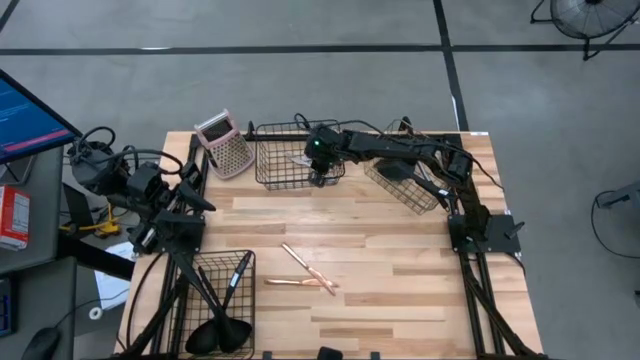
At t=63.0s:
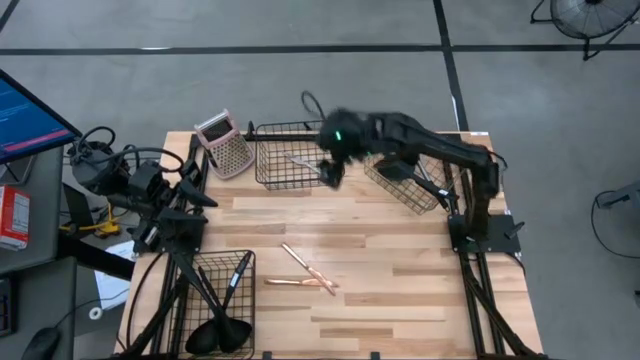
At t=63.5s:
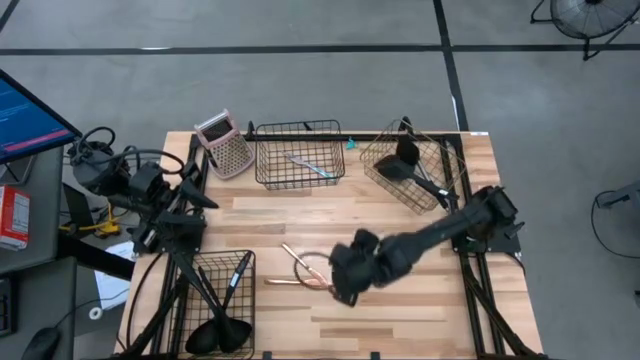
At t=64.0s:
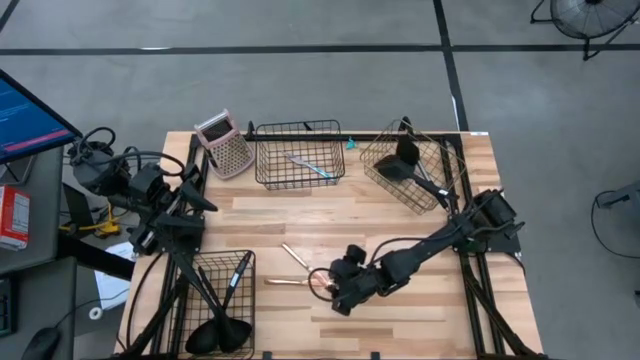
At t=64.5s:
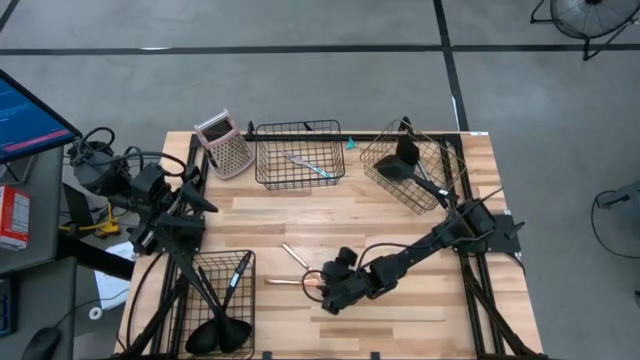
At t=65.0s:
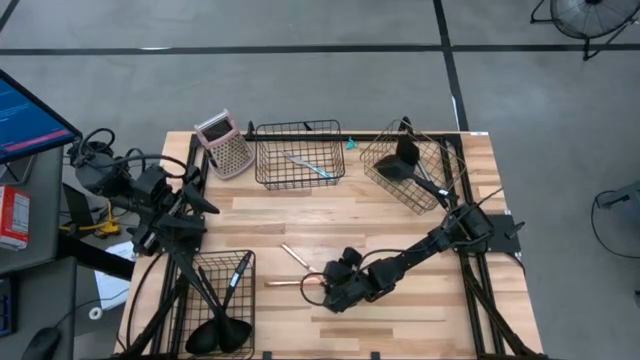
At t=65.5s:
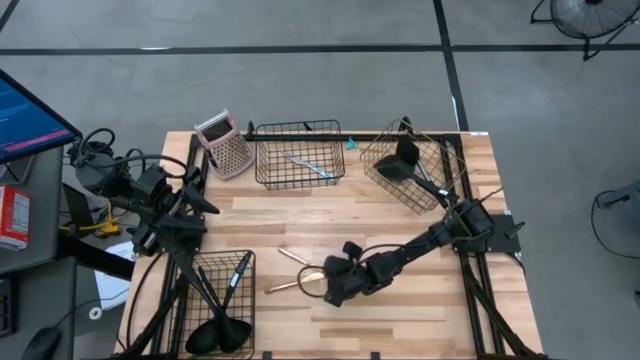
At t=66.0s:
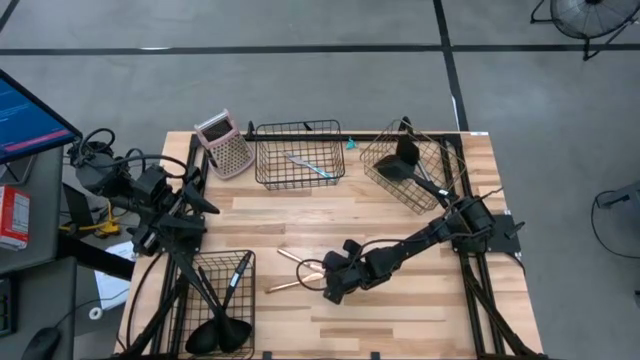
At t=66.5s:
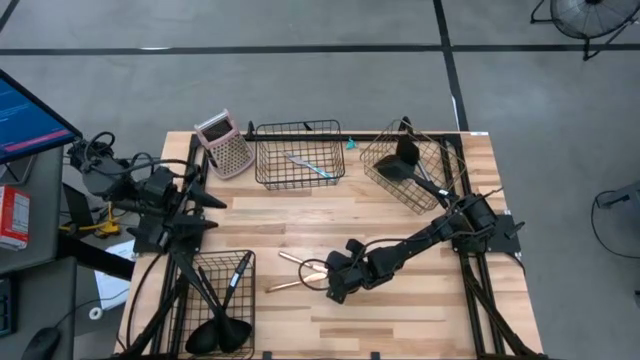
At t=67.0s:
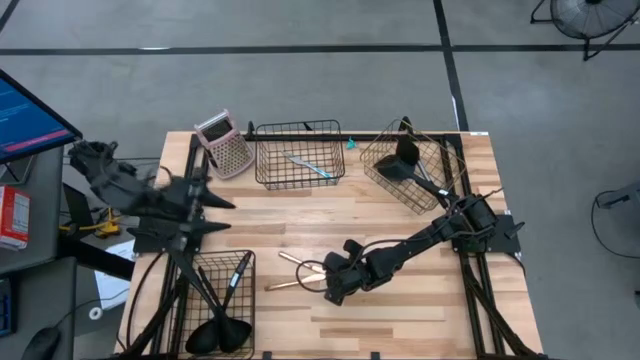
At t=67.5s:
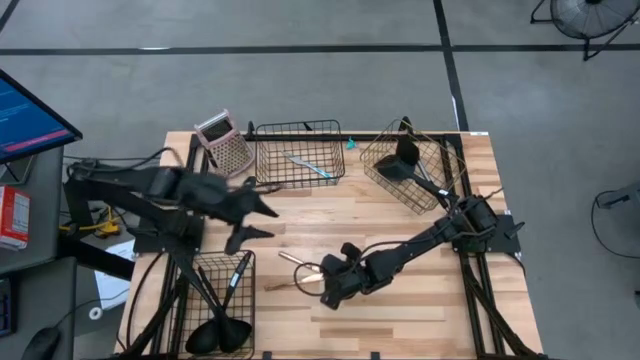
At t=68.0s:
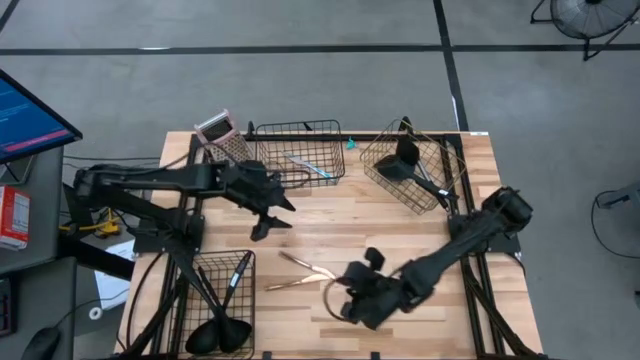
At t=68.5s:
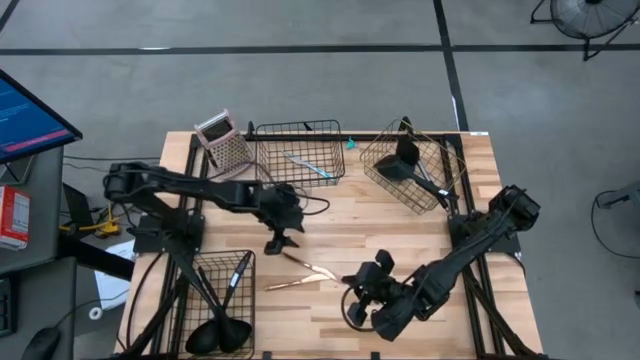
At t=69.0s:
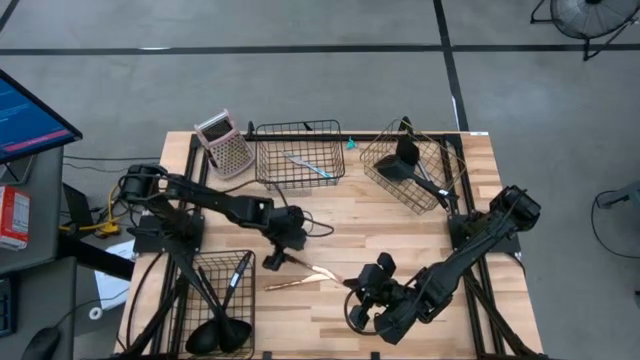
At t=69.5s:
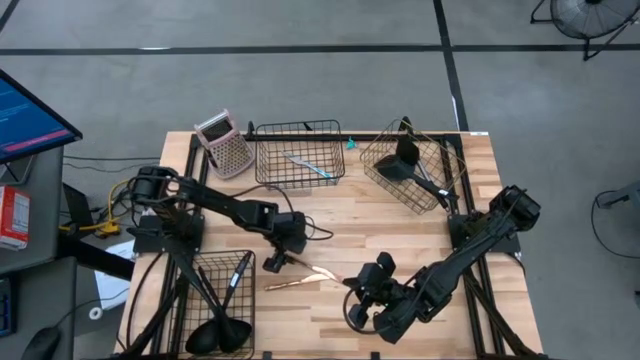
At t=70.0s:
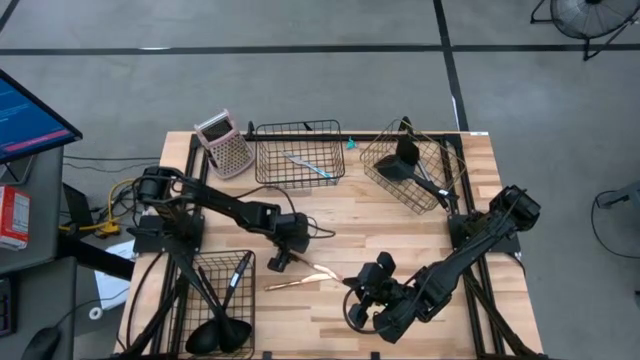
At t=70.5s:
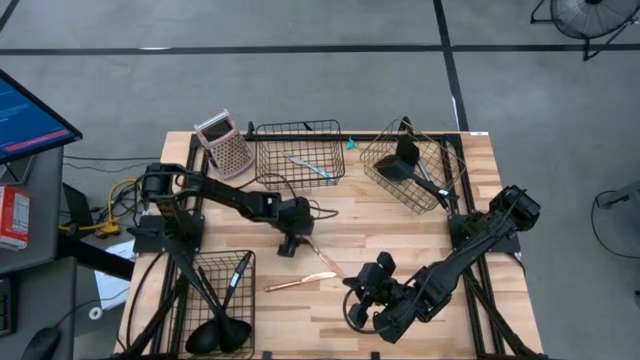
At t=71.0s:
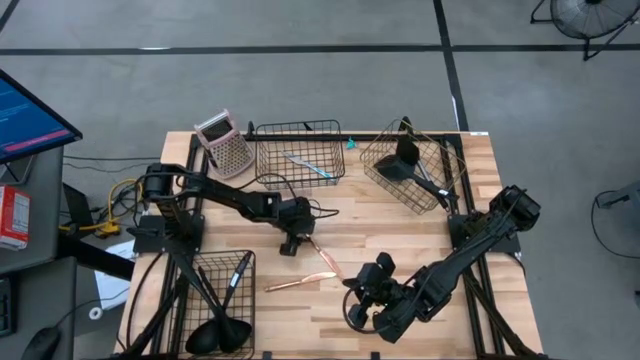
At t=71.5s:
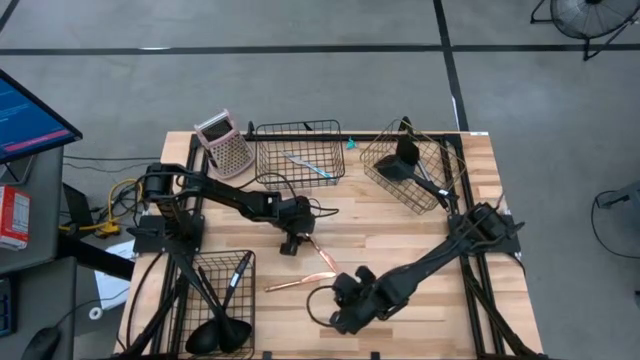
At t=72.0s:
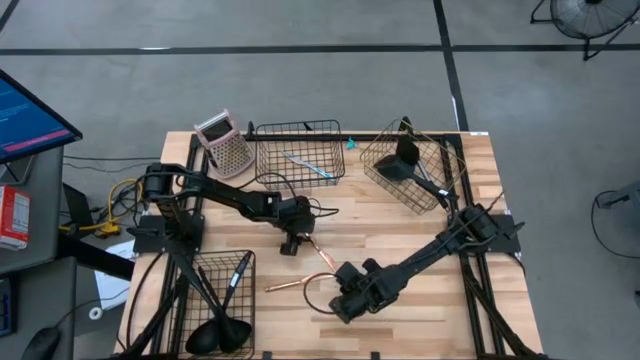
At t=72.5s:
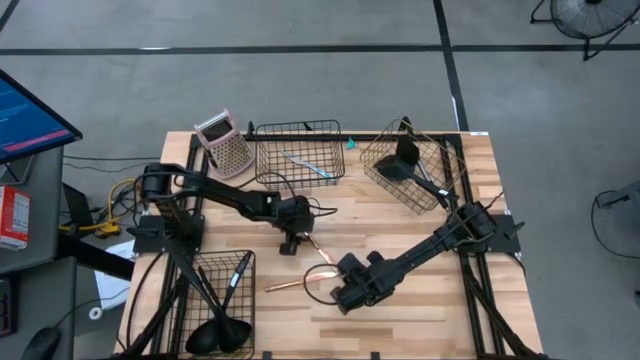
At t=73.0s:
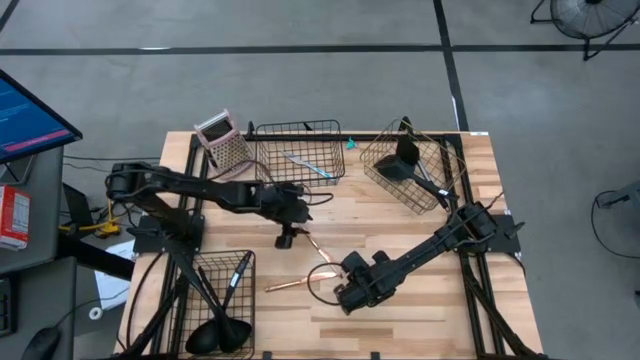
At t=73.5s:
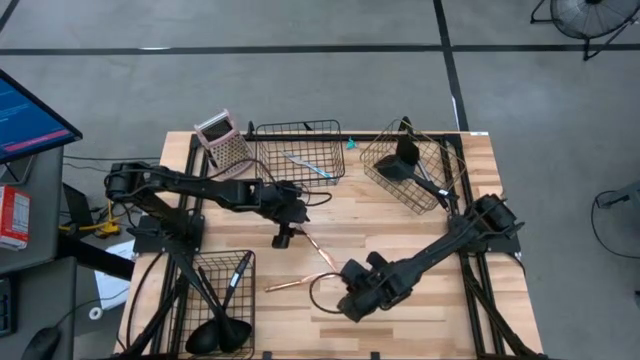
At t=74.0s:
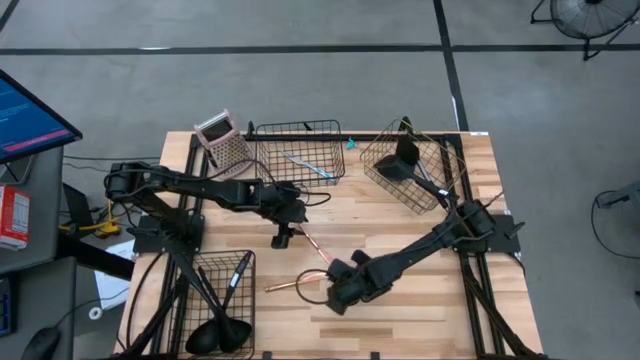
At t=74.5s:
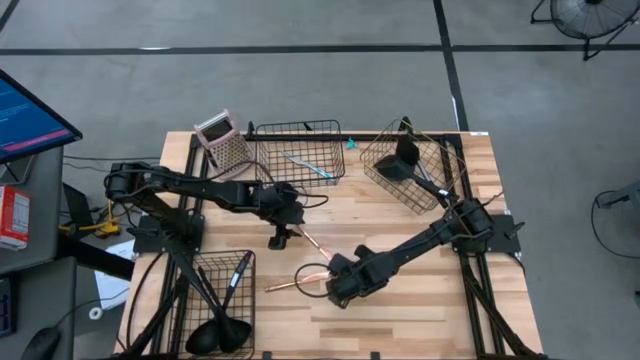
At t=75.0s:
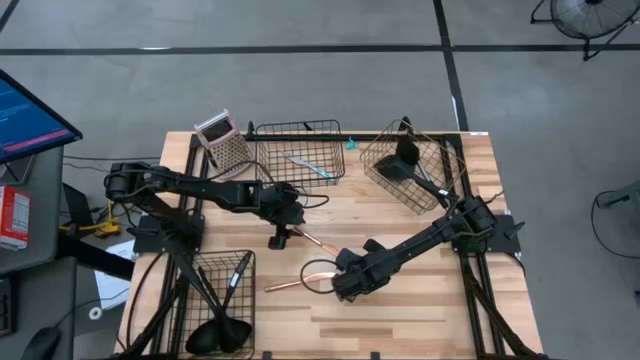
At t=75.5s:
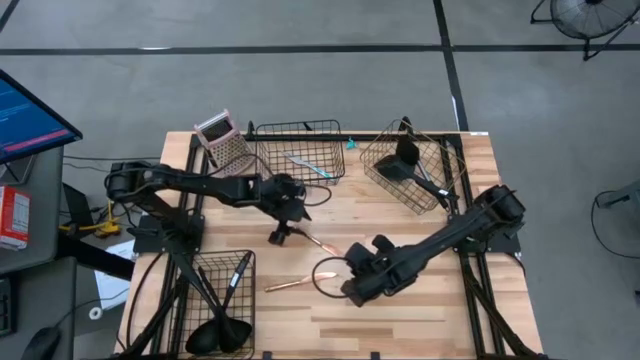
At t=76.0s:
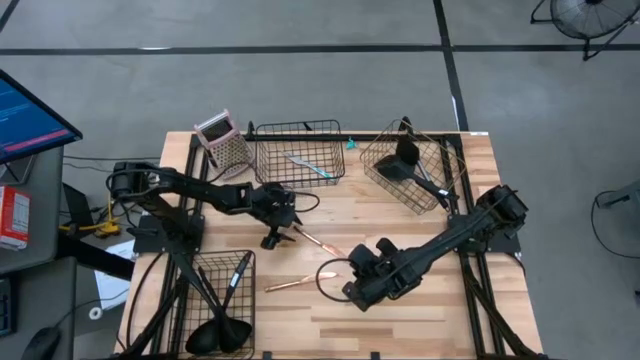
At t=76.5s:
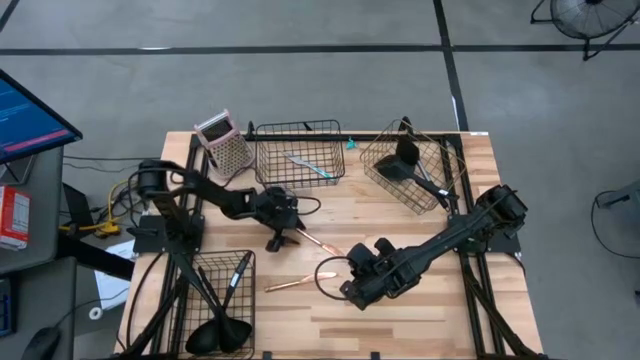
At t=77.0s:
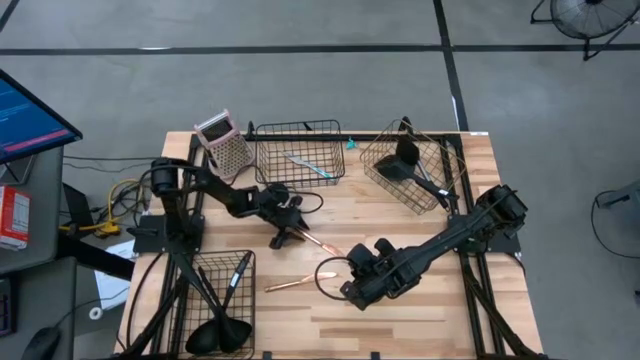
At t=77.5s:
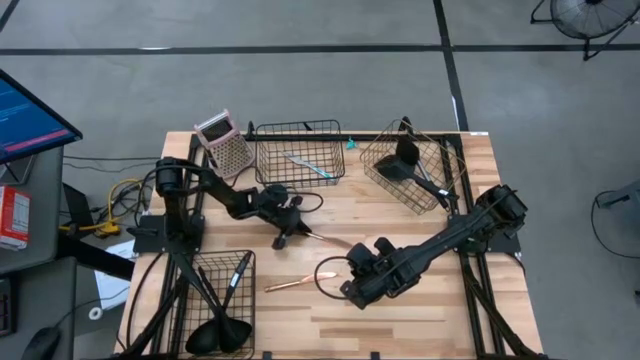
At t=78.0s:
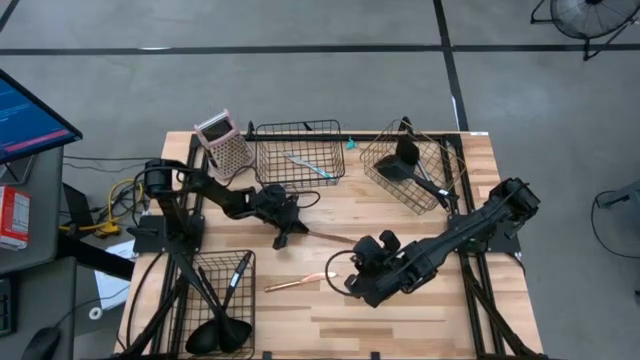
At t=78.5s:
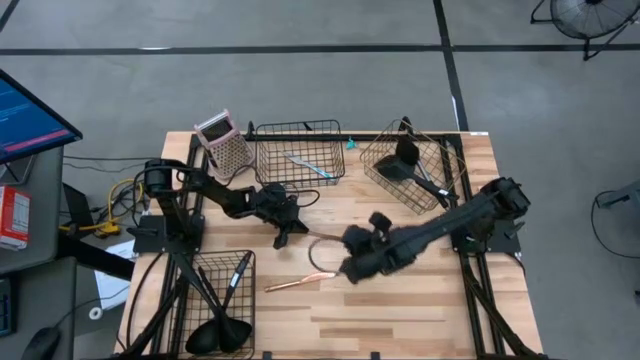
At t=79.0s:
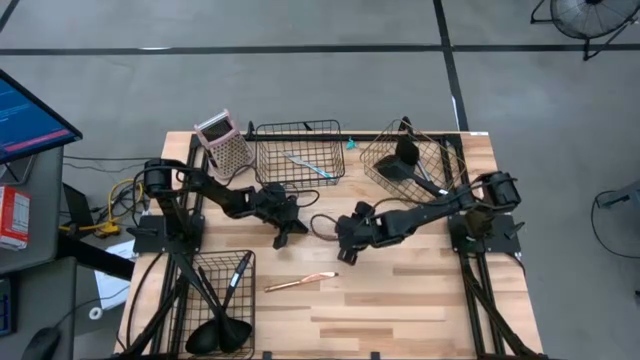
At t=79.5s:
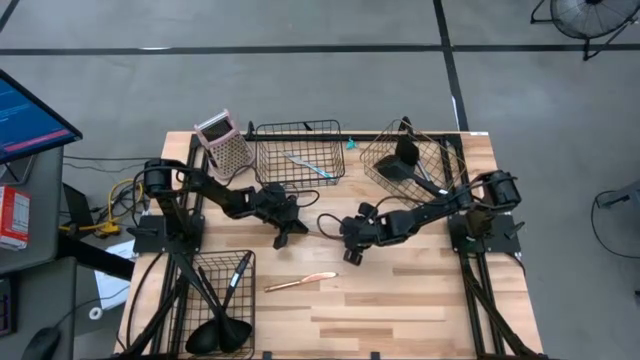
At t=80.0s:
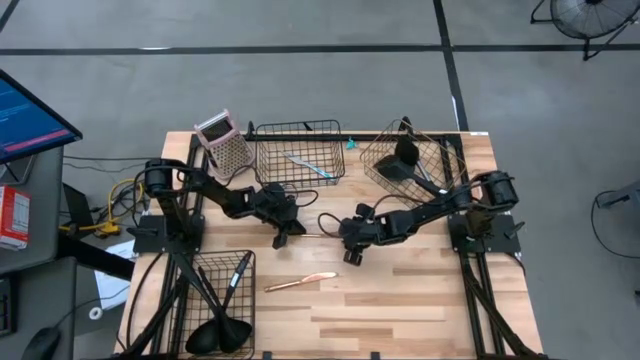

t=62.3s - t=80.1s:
Task: Pick & Place Kitchen Items
Put the brown knife into the top black wire basket

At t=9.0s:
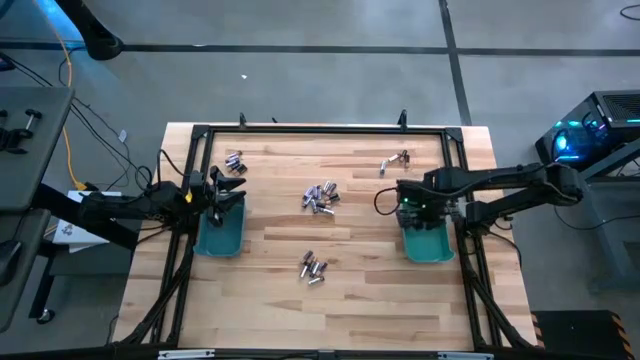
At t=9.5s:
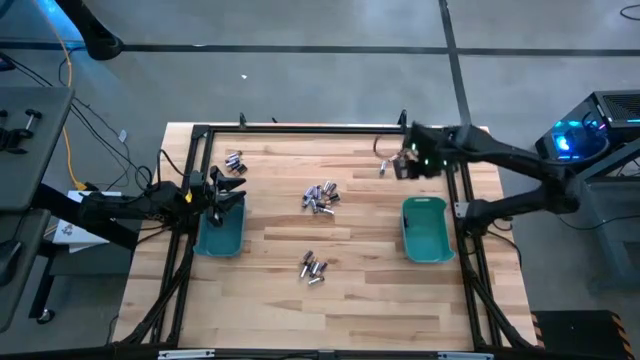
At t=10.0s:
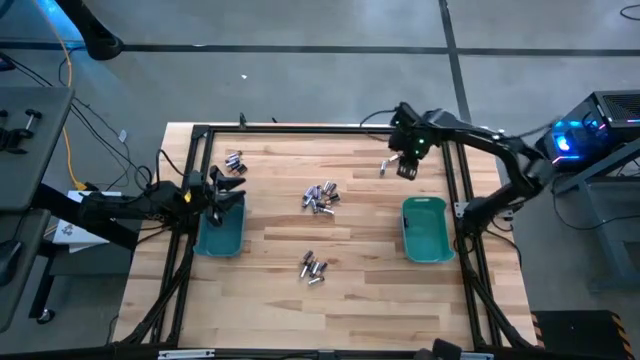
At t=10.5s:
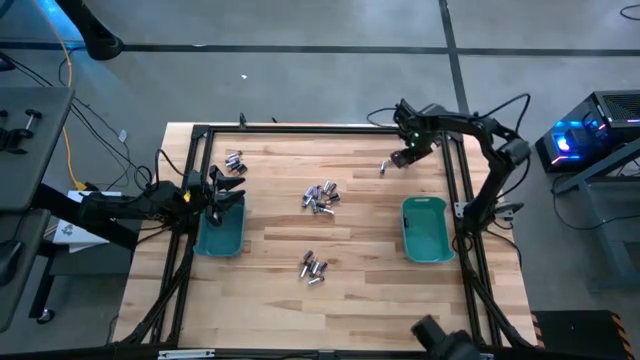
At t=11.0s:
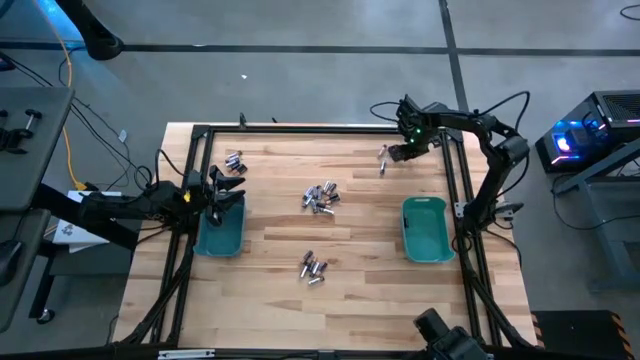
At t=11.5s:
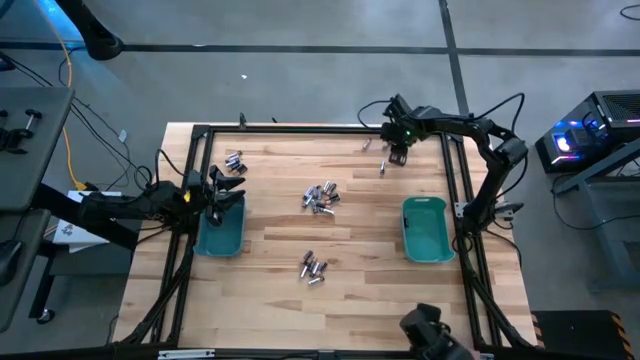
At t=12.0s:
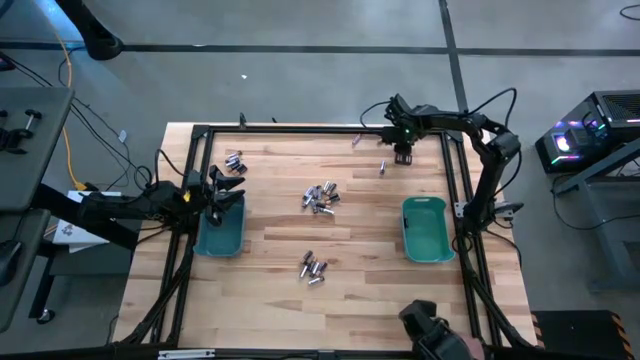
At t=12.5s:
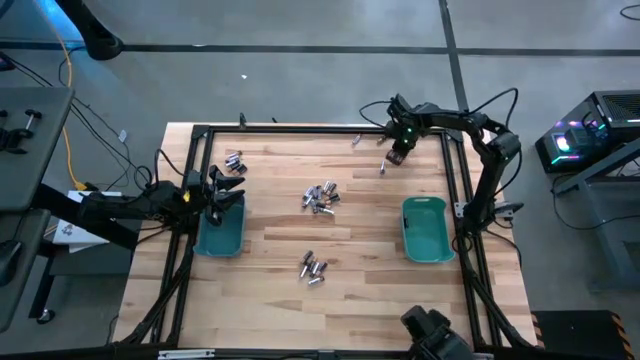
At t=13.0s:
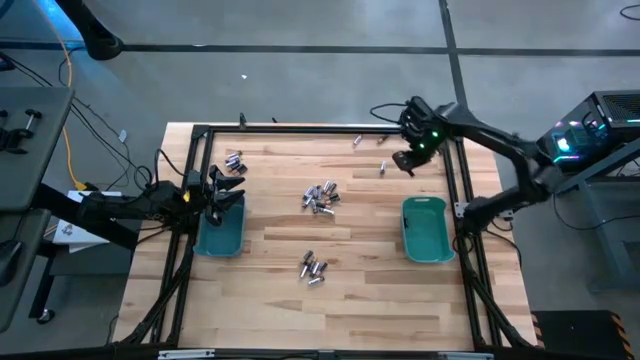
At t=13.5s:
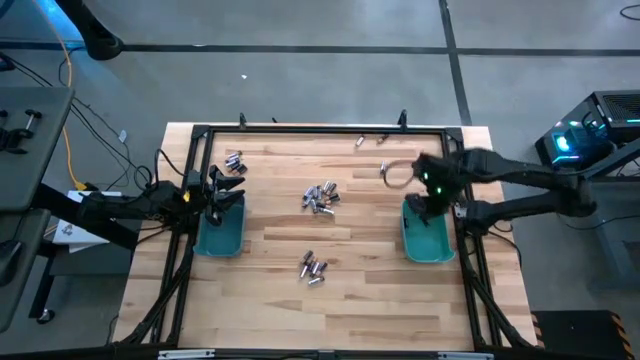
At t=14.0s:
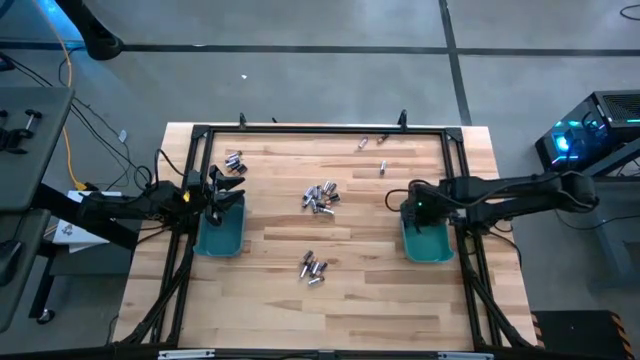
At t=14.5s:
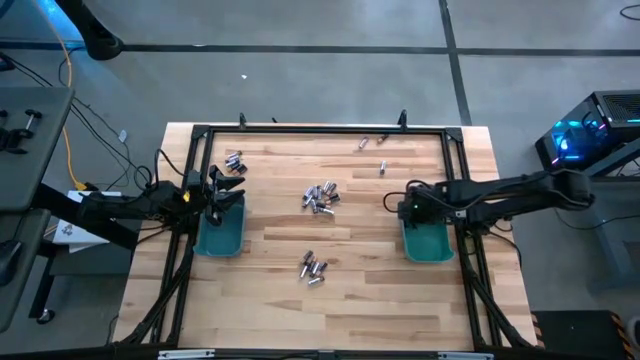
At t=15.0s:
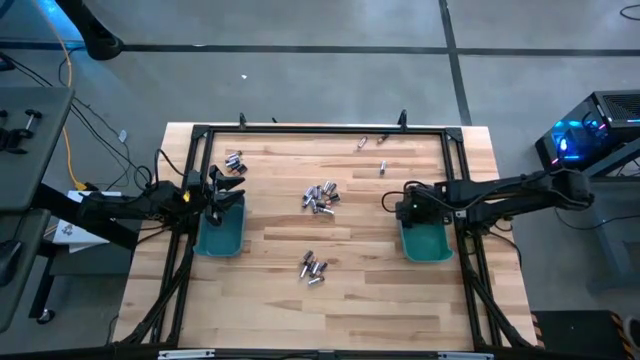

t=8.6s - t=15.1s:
Task: Sort batteries
Put the black battery into the green bin
